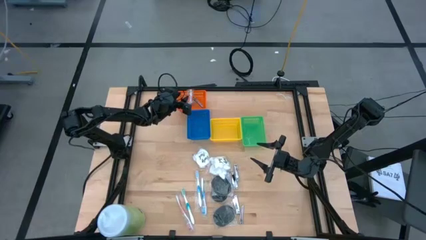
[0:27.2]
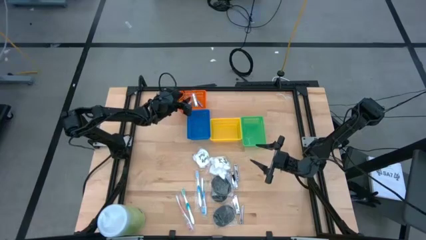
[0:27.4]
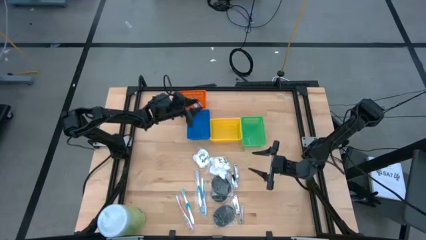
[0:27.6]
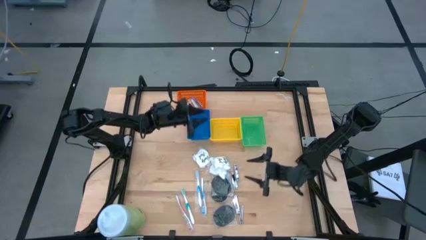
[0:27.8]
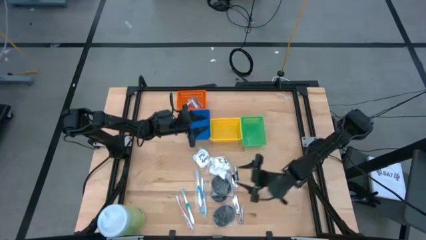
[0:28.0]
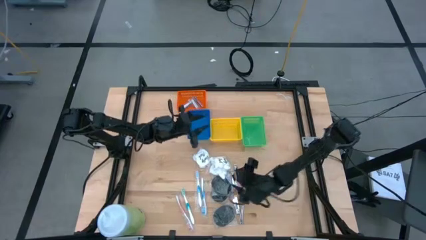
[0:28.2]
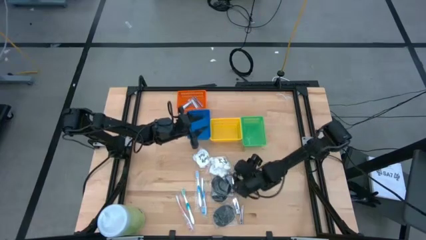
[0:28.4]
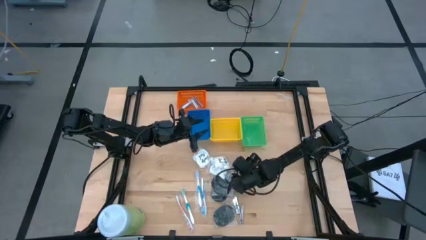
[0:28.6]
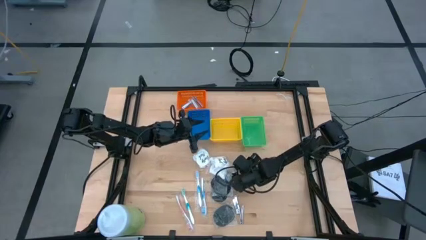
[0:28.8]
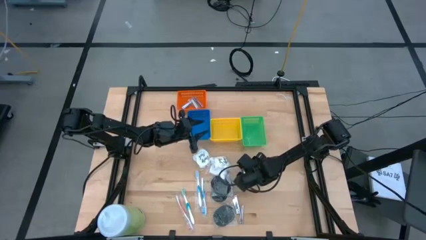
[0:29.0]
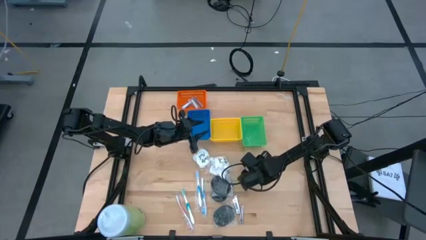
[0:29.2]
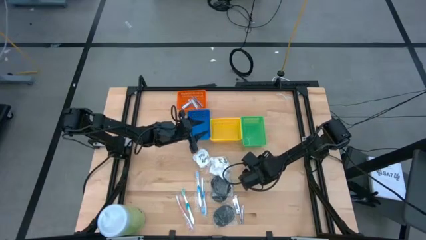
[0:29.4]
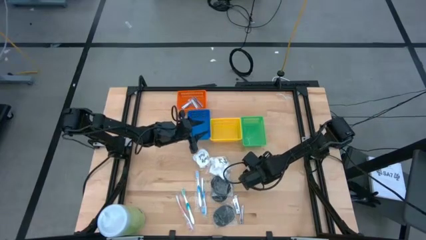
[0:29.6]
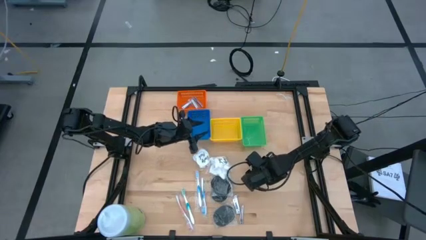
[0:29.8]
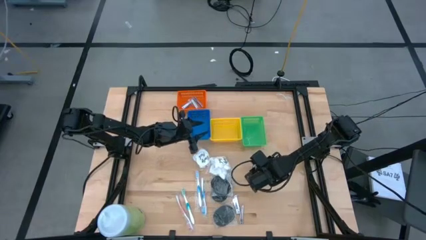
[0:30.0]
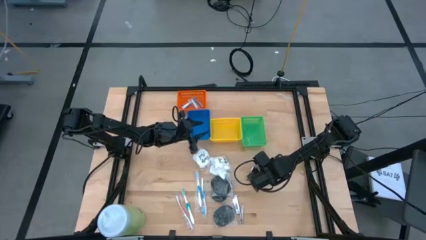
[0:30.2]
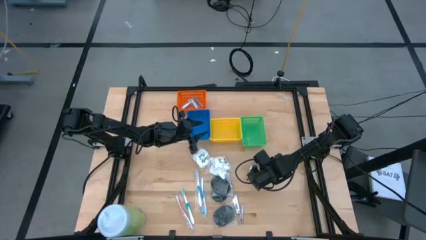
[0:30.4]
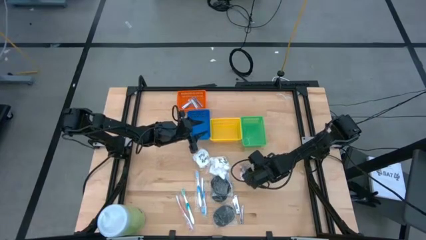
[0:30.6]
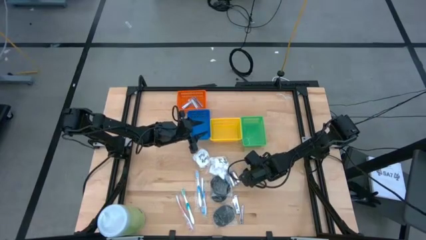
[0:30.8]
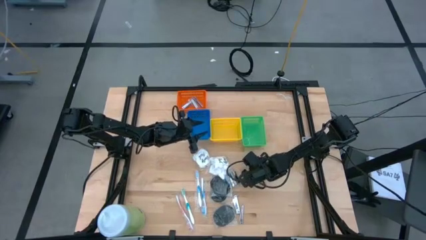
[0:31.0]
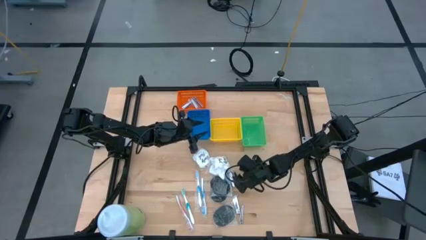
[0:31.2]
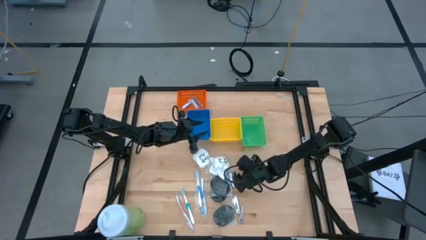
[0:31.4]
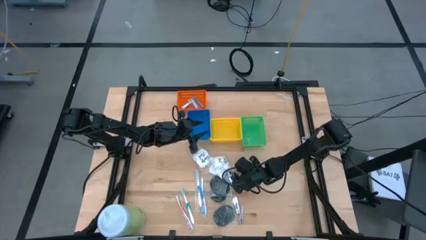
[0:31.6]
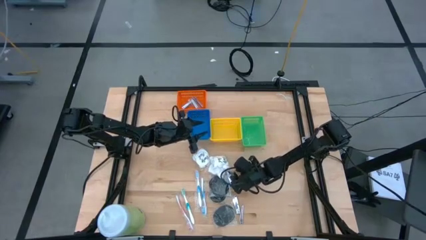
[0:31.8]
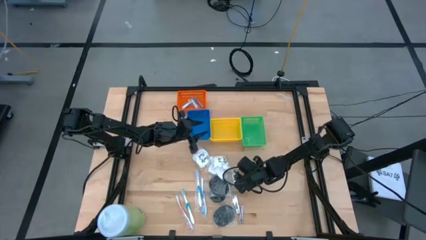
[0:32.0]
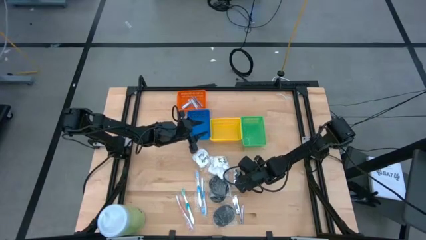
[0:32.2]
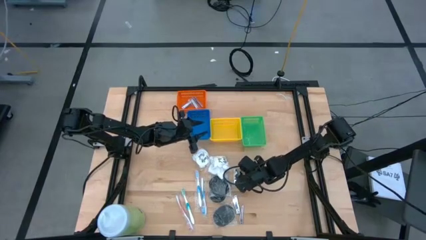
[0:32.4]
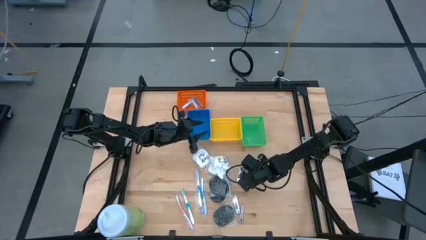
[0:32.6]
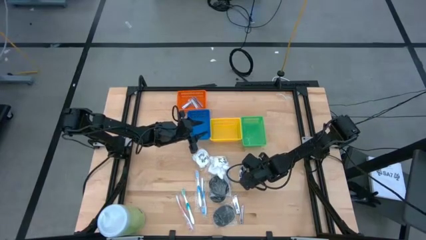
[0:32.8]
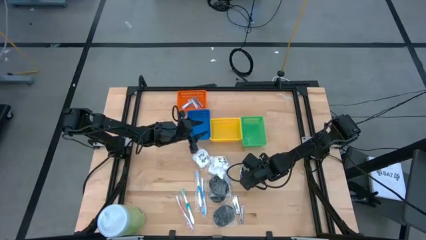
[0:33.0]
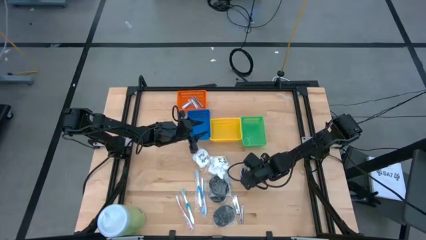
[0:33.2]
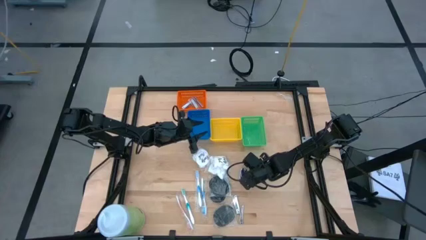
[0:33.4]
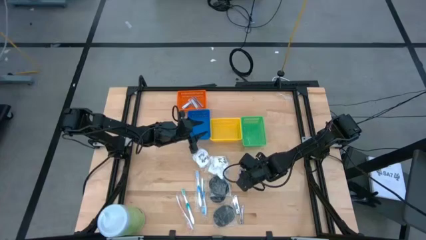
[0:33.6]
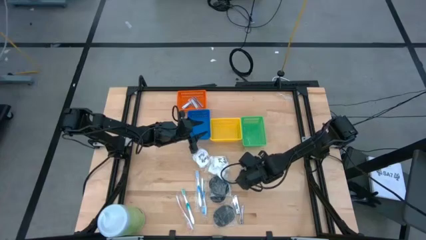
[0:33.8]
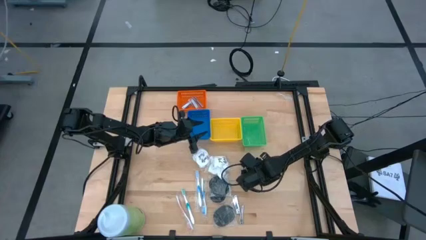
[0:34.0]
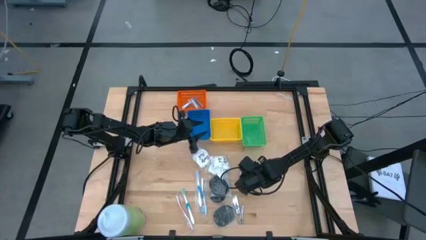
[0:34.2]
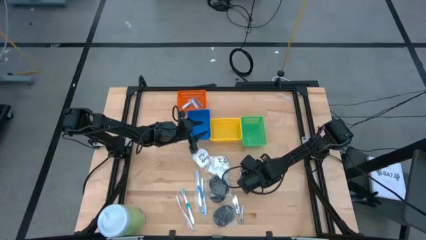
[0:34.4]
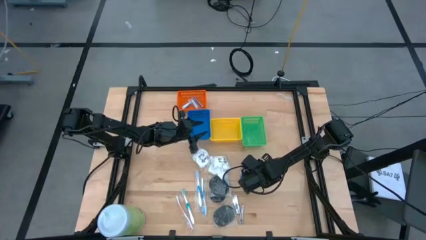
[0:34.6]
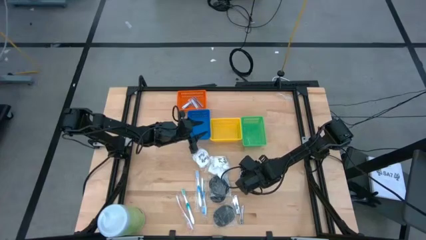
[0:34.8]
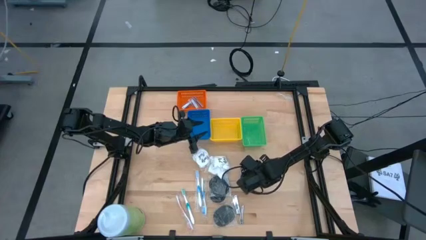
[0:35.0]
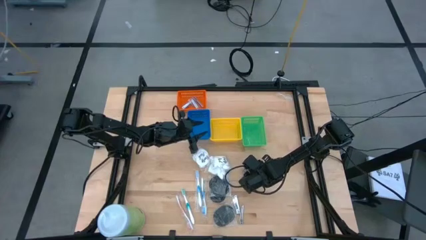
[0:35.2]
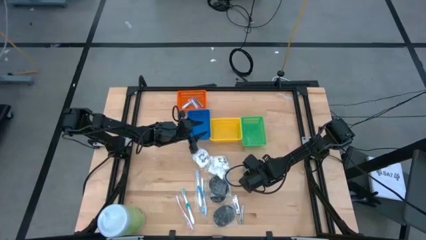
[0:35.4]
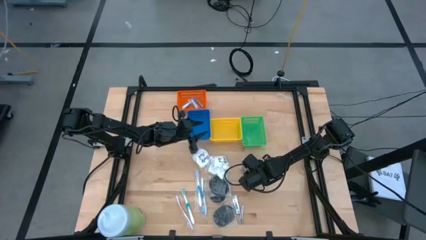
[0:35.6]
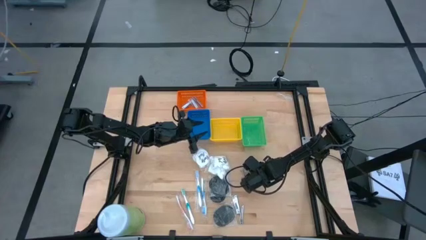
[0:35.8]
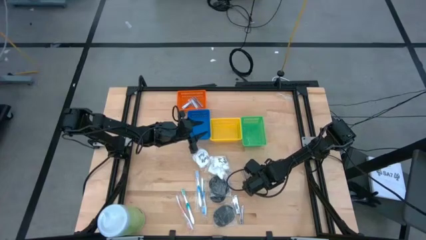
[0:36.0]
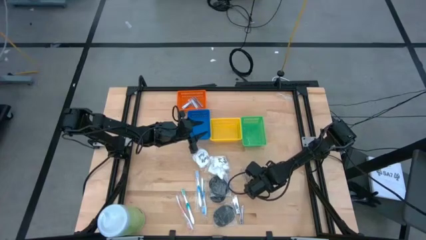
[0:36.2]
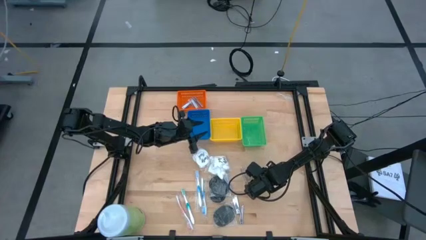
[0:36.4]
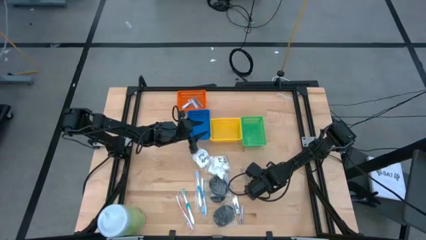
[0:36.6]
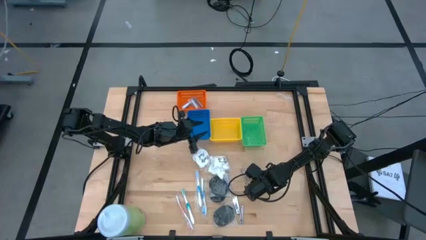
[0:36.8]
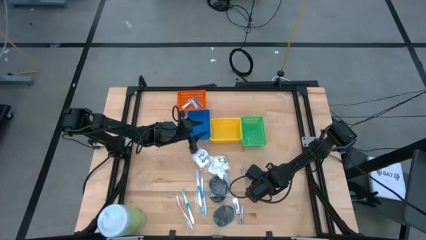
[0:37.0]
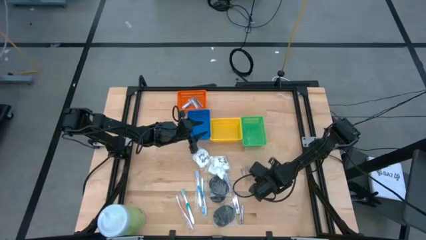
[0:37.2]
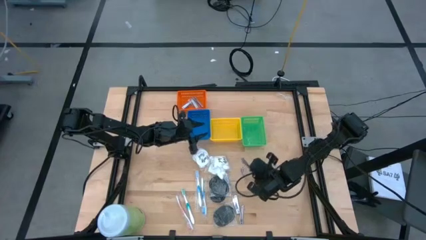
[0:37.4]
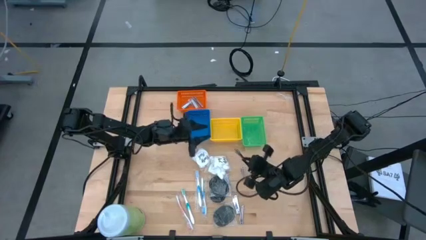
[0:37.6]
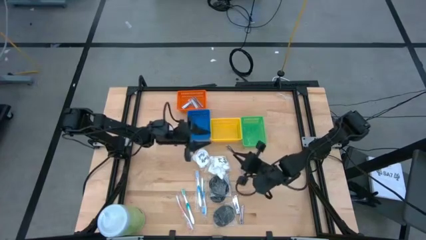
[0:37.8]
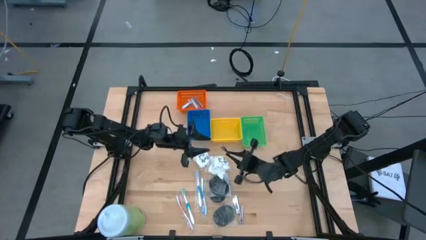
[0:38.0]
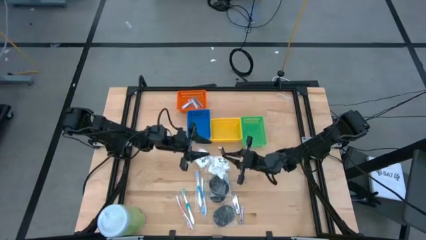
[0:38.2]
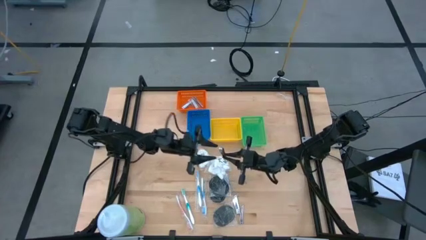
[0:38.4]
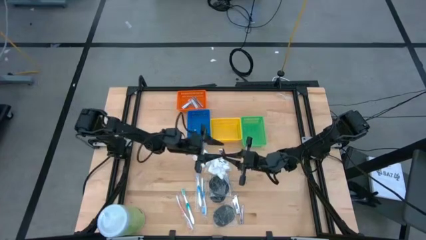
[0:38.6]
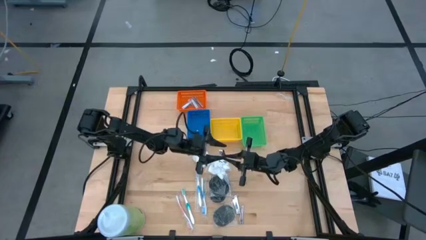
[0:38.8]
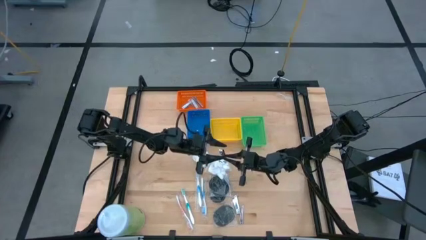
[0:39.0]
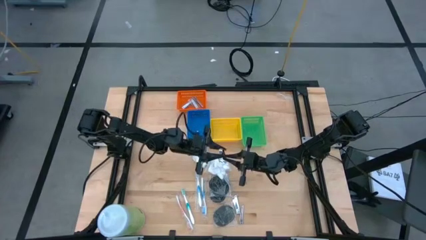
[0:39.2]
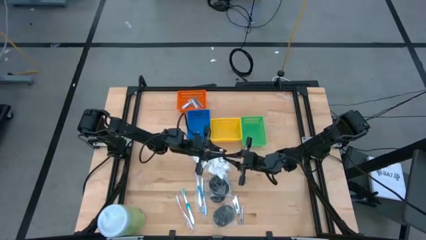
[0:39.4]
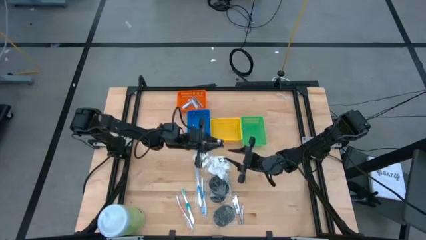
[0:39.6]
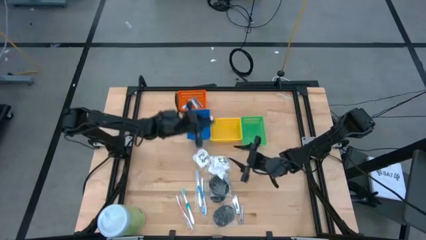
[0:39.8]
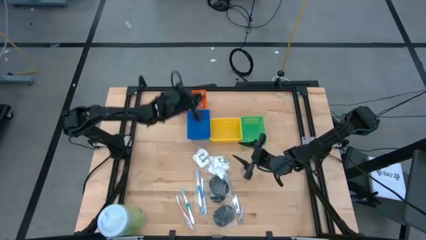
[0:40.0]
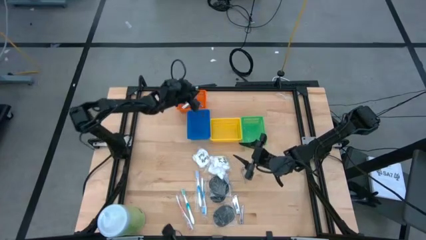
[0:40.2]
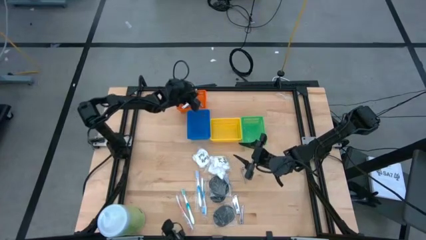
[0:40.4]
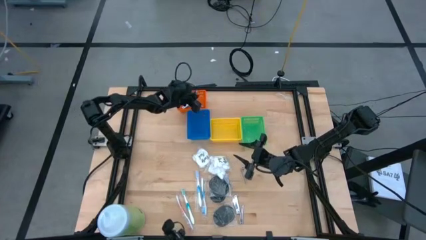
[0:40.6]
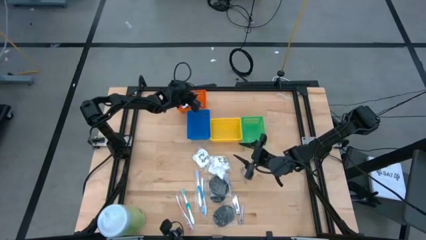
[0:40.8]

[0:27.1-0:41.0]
Task: Pick & Place Travel size toiletries
Put the nail cutter into the orange basket
